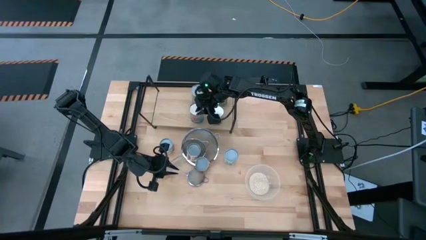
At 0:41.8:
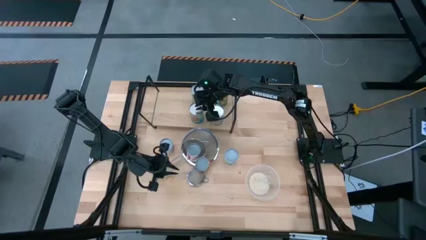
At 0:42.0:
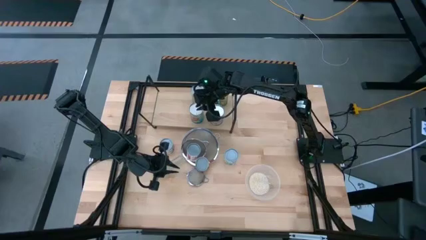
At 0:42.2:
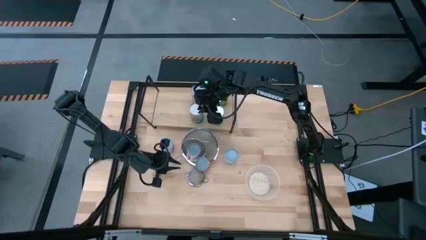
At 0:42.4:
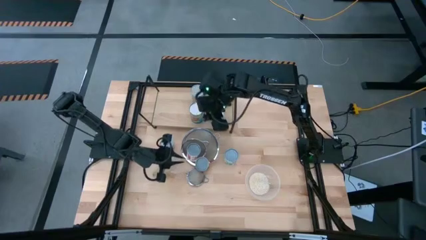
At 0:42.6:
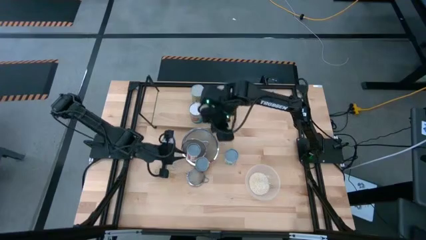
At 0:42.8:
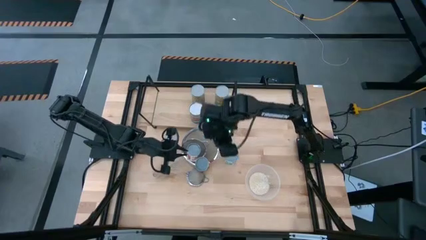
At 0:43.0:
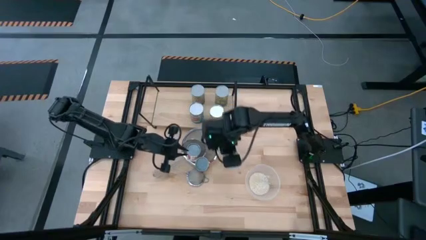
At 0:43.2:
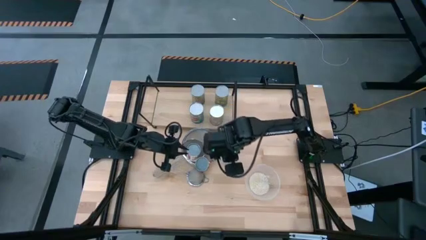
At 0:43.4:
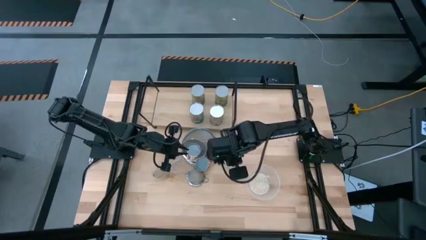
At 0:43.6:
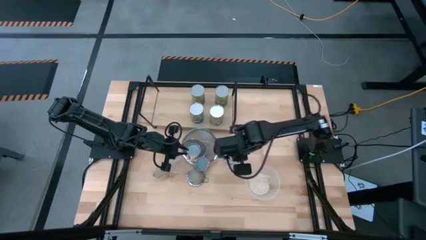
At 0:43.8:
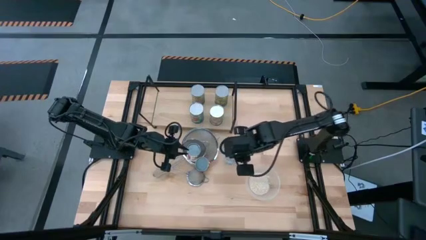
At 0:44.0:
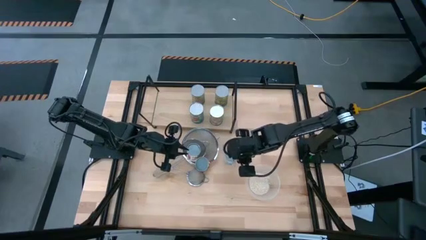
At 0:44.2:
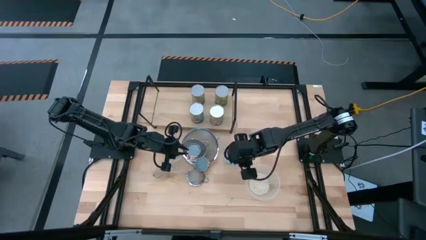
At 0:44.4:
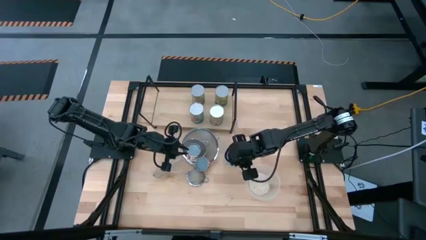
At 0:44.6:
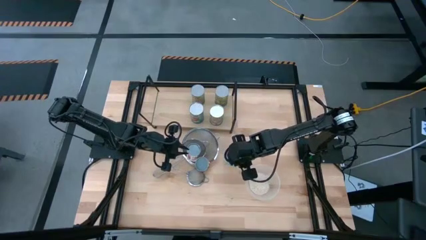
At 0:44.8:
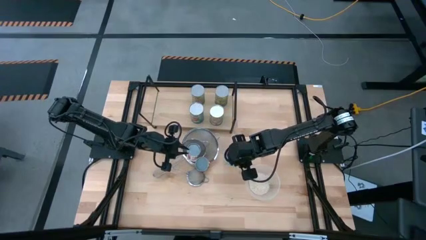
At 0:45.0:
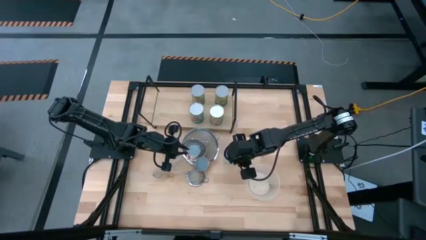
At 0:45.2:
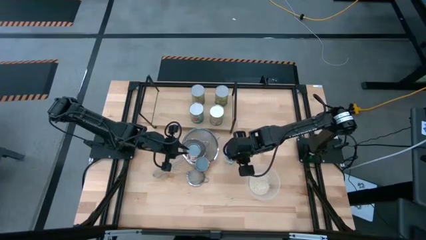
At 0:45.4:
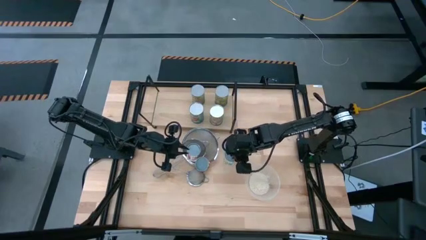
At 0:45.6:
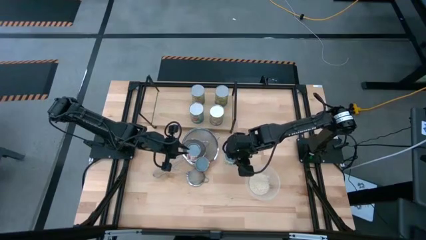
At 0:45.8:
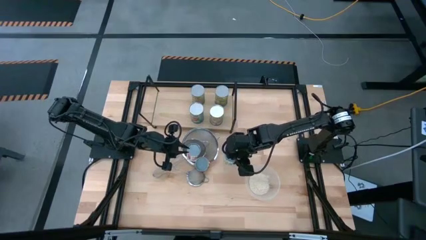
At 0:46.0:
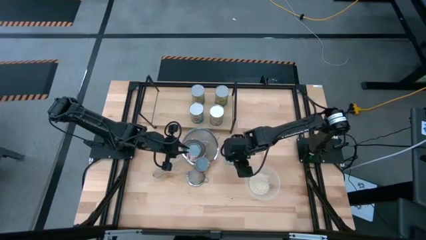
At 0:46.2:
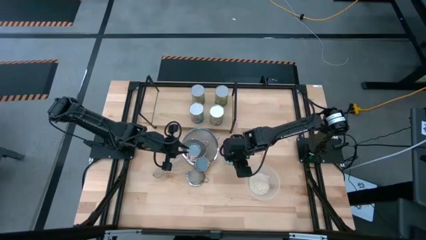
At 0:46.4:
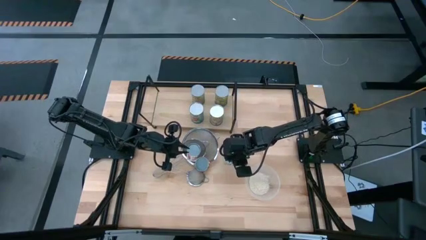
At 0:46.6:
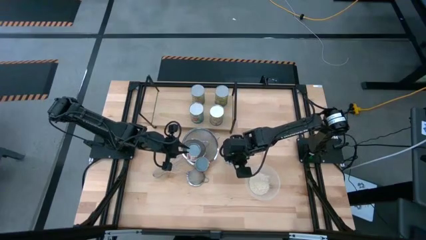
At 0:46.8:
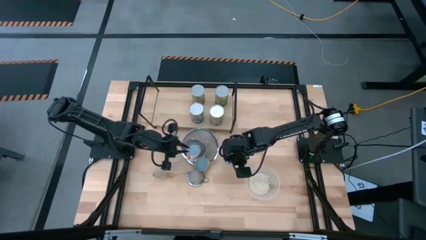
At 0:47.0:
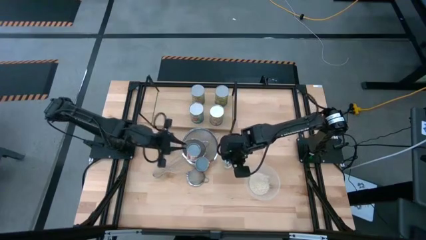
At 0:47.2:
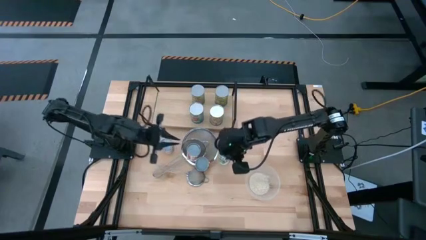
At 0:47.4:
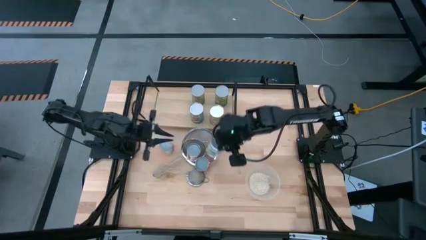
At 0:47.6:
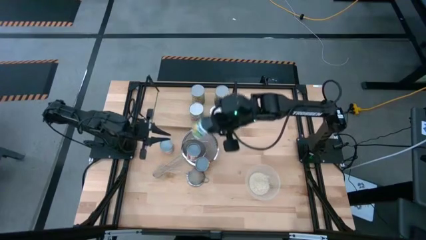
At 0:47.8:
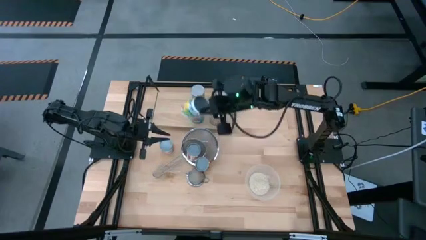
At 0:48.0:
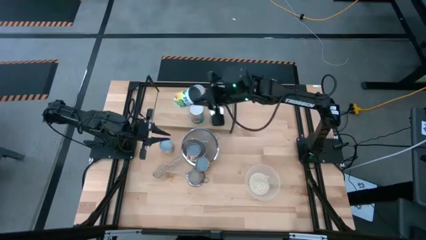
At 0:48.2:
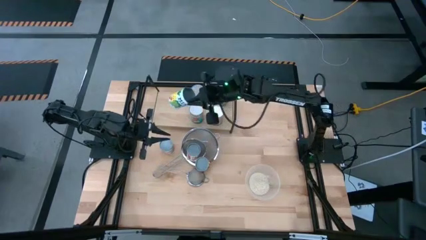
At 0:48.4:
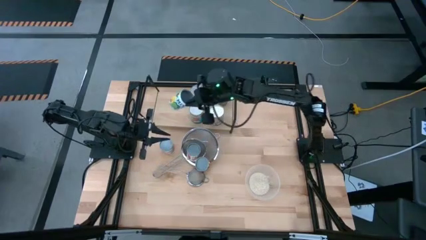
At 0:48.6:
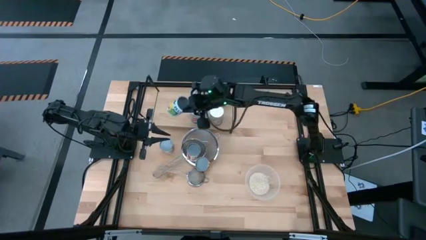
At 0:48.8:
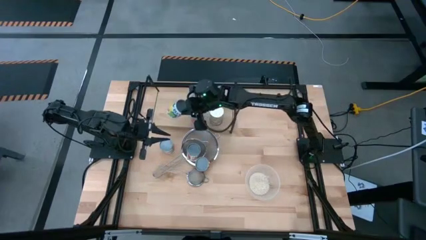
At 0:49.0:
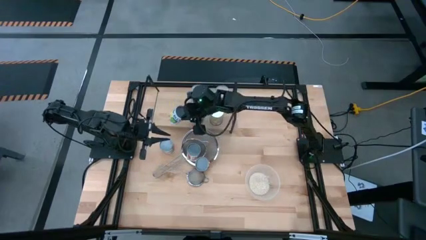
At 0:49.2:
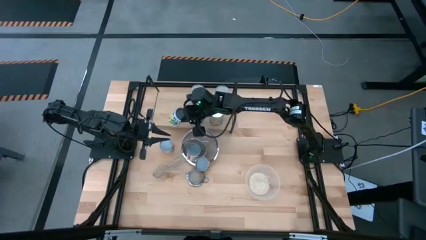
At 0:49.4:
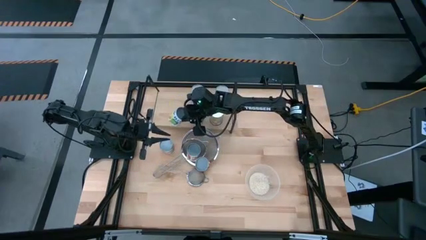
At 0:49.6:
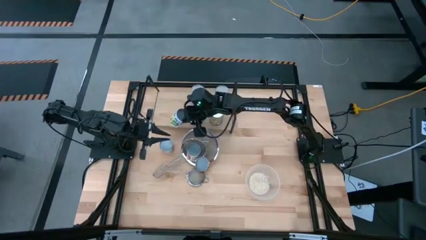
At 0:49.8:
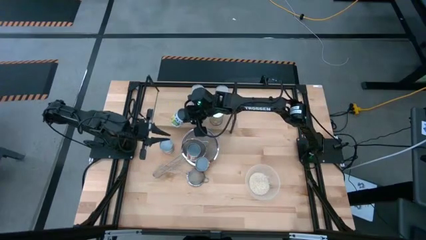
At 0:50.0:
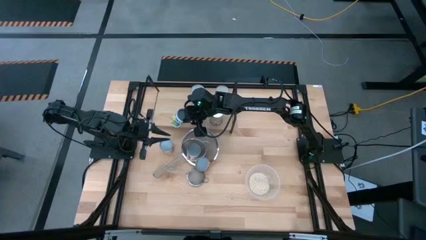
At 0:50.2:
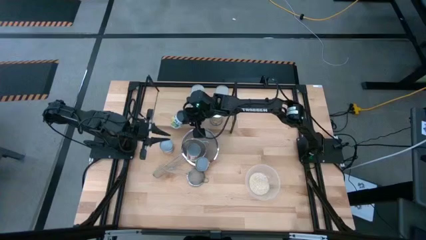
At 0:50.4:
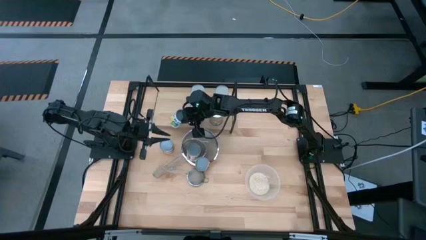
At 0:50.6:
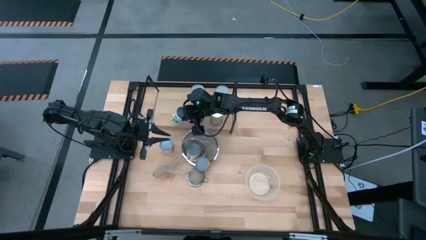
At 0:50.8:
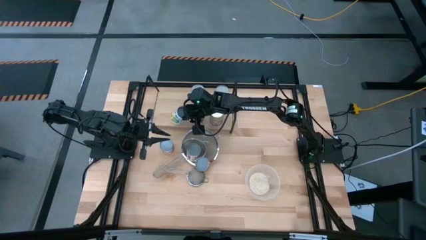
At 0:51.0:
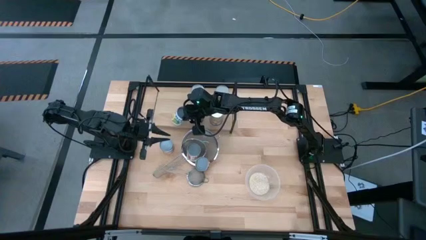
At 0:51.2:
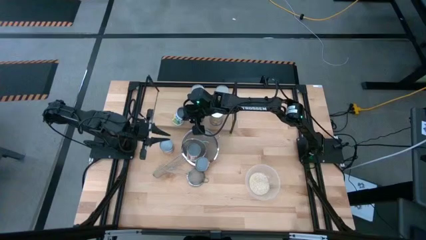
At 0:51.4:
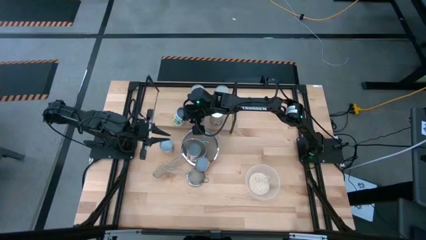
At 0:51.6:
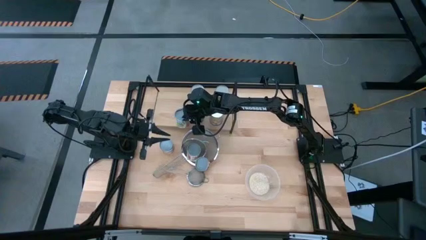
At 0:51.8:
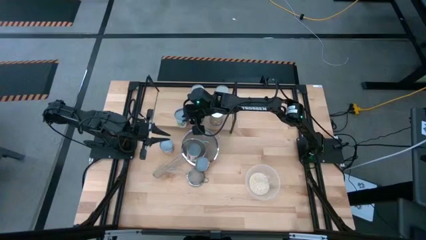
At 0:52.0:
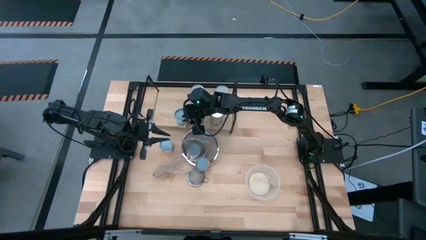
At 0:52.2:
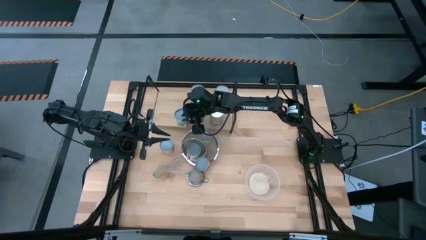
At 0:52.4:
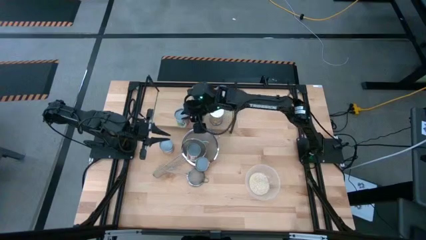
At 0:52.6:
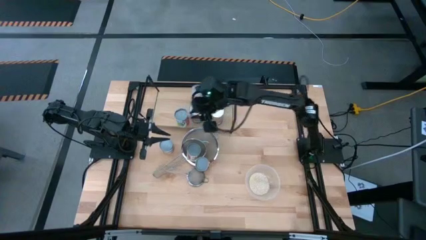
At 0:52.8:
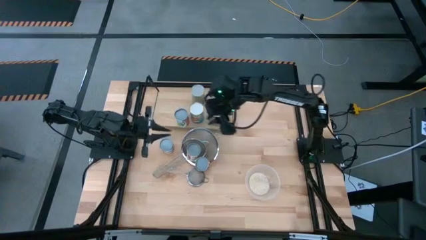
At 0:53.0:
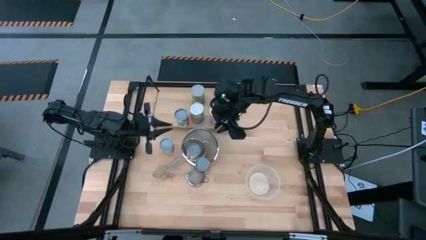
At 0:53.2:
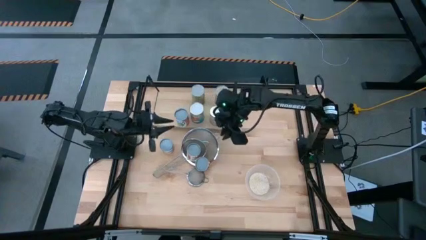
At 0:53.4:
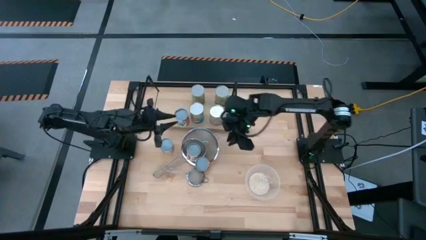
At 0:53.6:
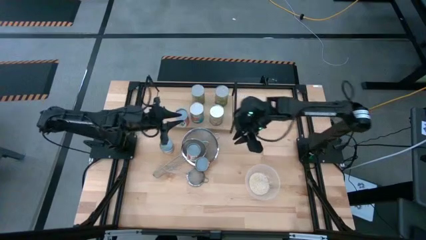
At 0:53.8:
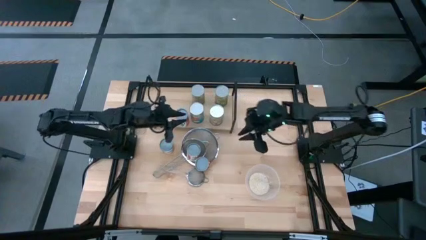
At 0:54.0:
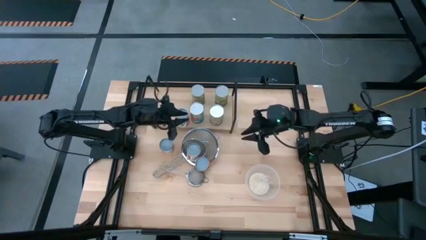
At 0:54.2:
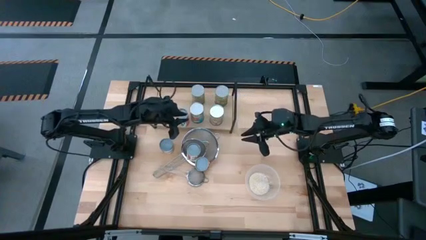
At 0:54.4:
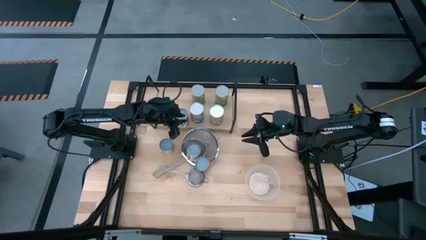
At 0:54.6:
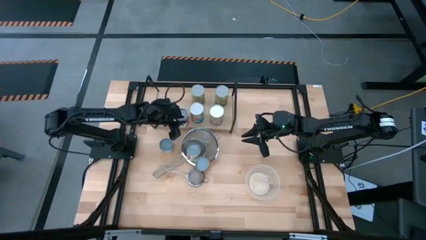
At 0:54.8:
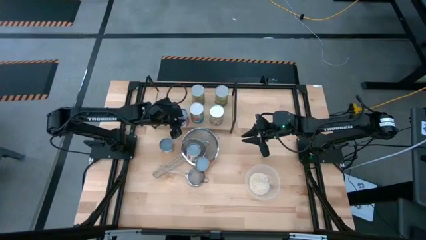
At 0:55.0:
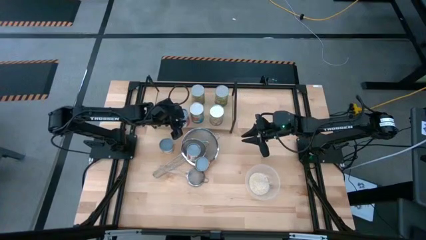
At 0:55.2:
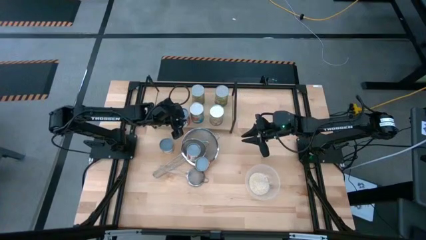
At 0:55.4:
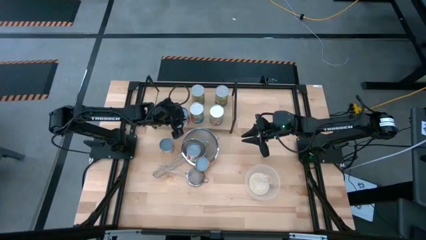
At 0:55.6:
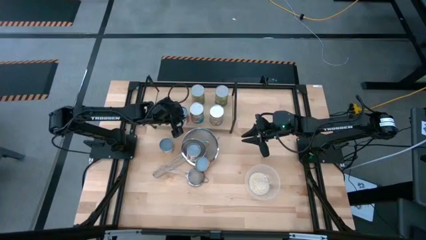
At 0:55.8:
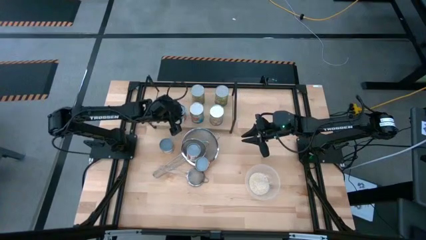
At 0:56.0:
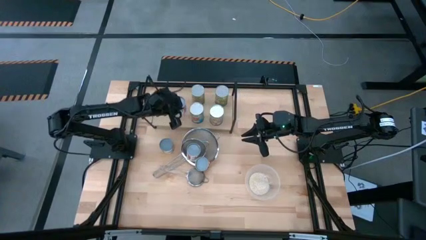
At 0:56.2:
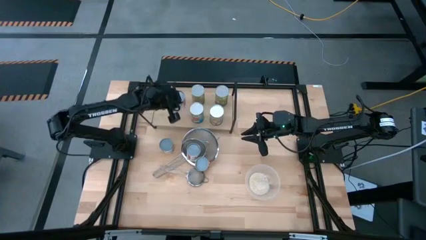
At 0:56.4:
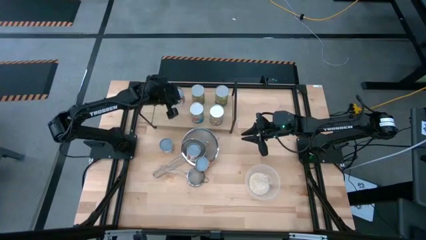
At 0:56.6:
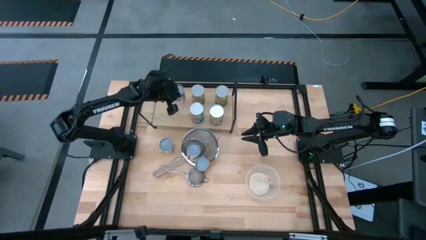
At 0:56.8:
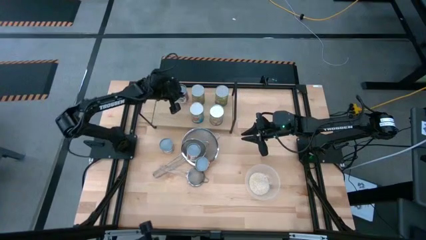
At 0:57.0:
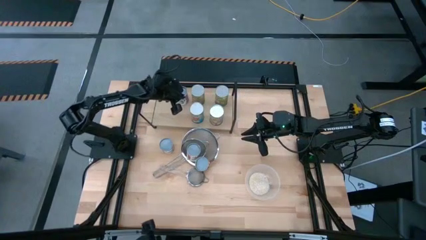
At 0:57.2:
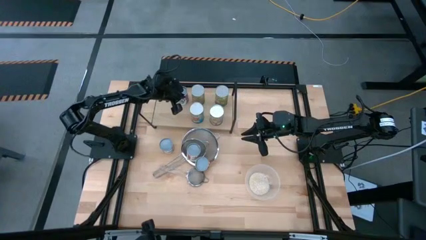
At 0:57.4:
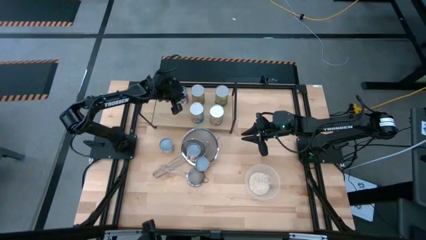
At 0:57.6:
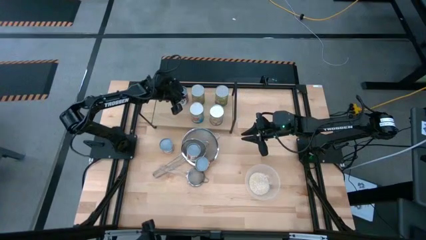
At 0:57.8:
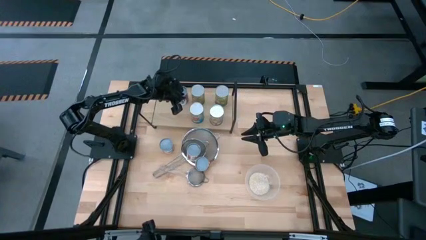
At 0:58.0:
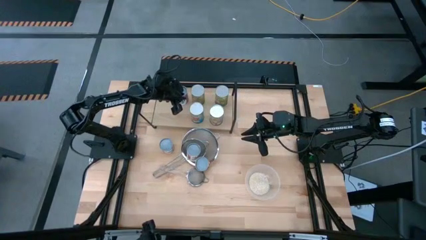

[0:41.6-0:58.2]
Task: Pick and place cans onto a shelf
Put the canned mixed fruit on the shelf
